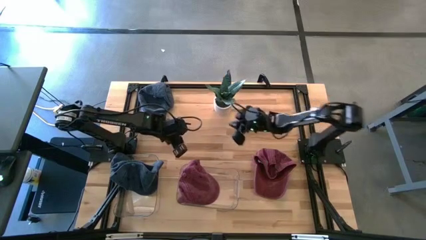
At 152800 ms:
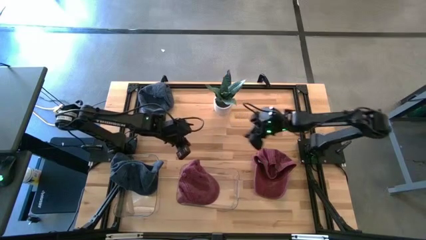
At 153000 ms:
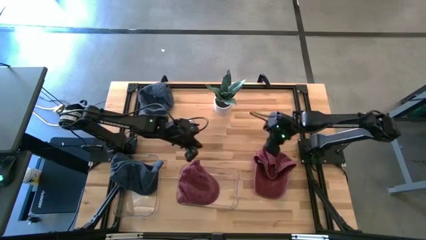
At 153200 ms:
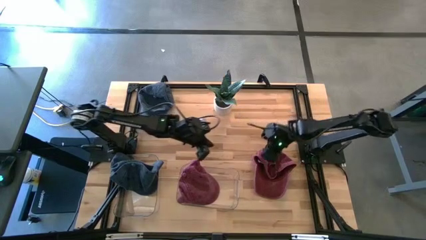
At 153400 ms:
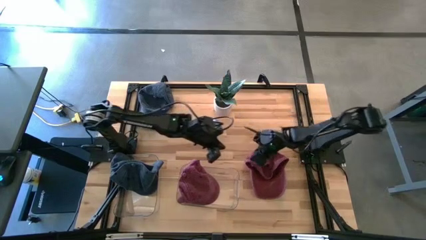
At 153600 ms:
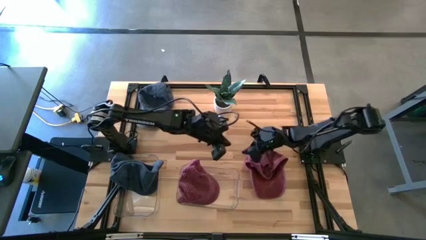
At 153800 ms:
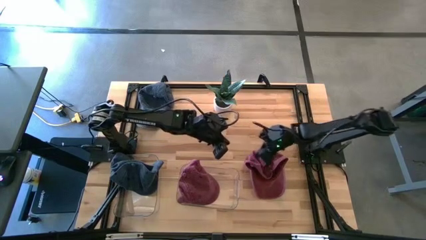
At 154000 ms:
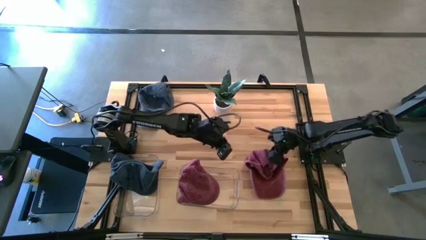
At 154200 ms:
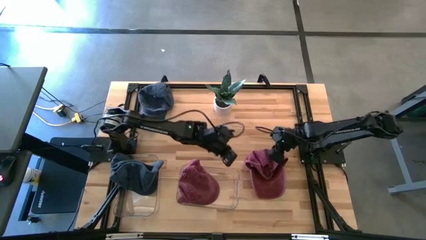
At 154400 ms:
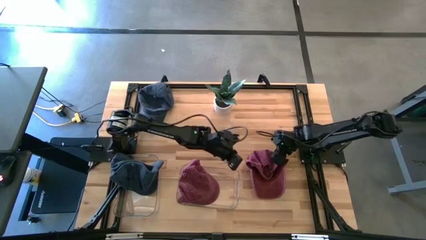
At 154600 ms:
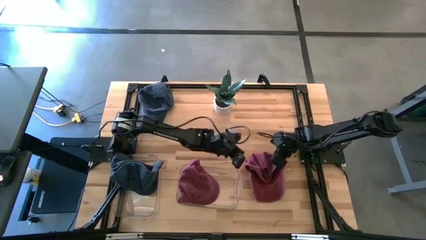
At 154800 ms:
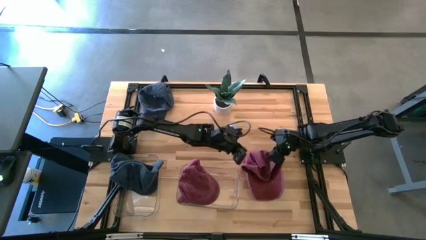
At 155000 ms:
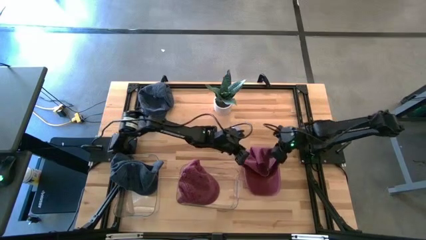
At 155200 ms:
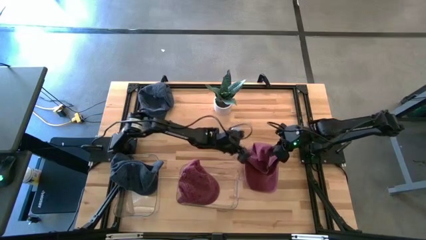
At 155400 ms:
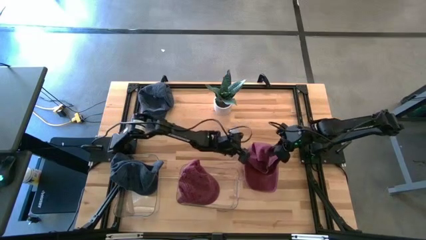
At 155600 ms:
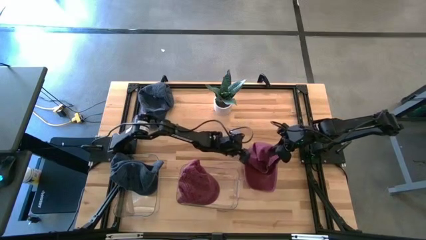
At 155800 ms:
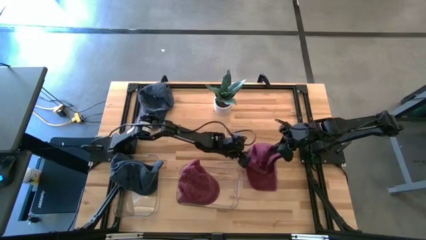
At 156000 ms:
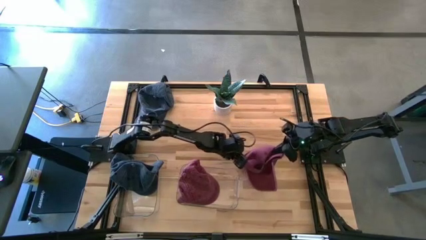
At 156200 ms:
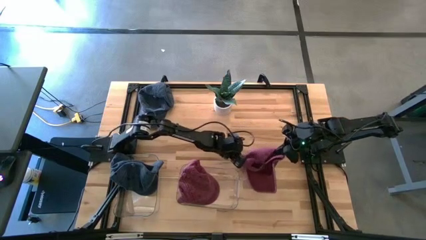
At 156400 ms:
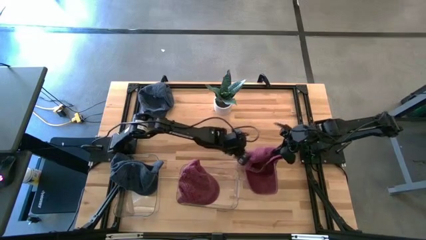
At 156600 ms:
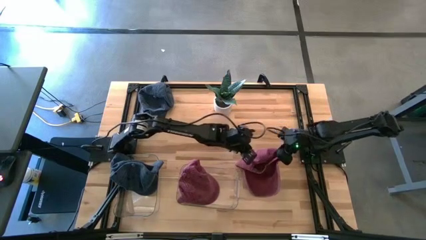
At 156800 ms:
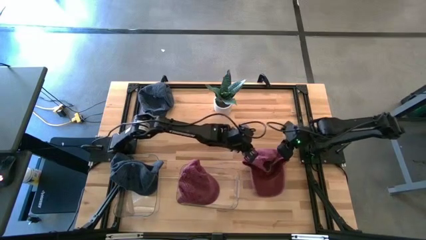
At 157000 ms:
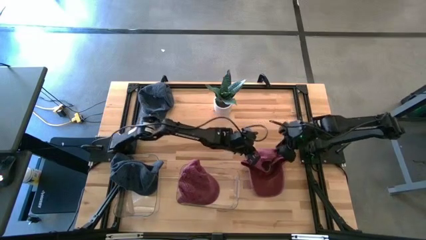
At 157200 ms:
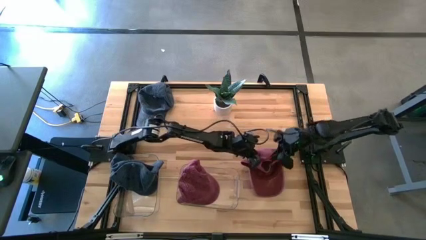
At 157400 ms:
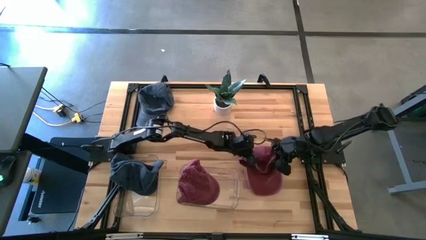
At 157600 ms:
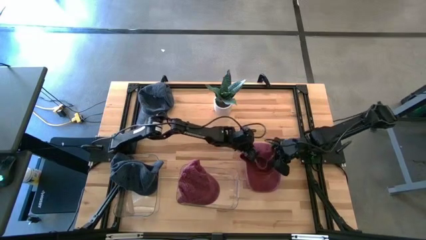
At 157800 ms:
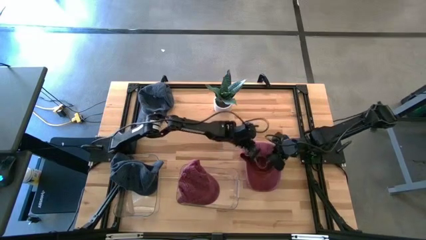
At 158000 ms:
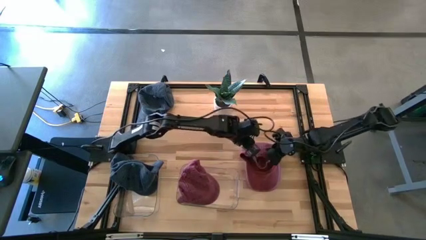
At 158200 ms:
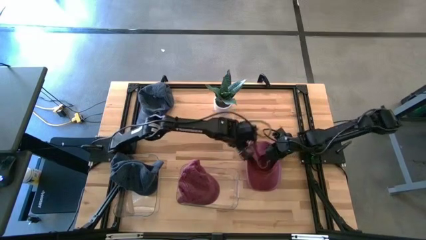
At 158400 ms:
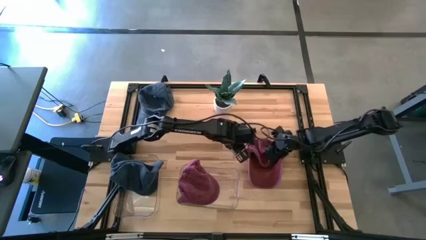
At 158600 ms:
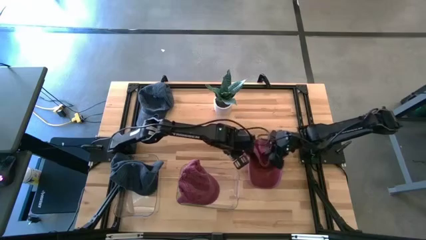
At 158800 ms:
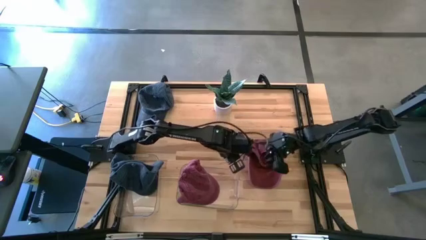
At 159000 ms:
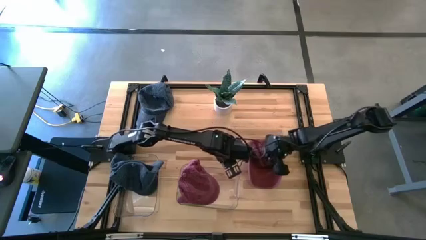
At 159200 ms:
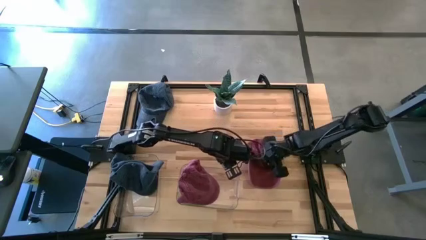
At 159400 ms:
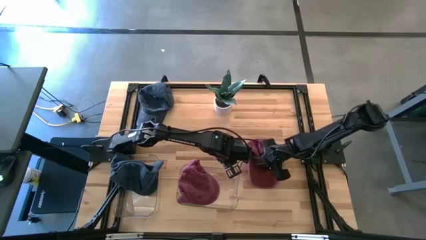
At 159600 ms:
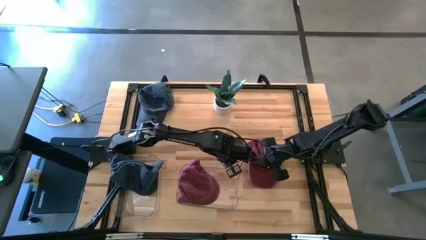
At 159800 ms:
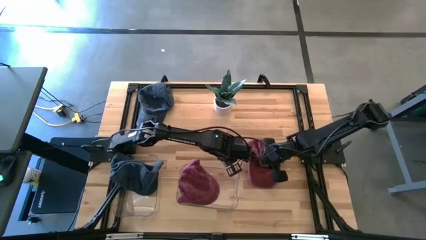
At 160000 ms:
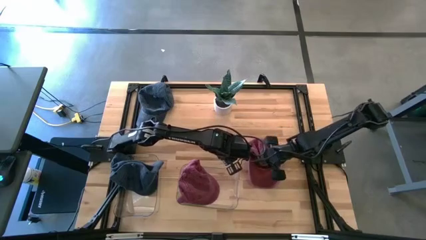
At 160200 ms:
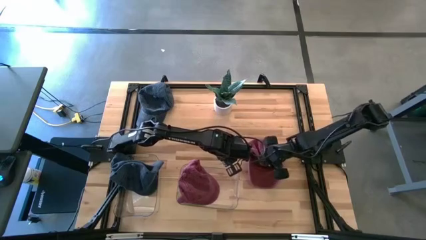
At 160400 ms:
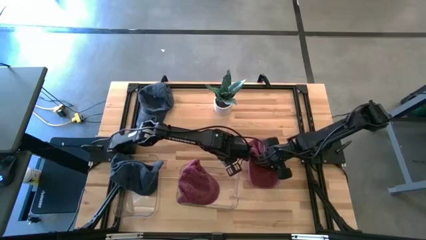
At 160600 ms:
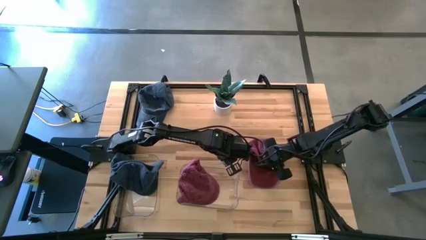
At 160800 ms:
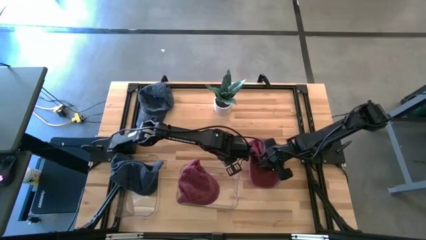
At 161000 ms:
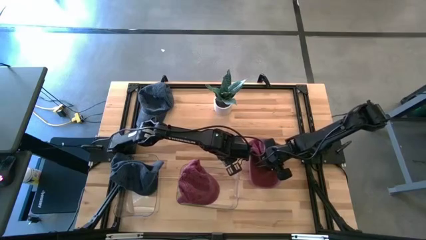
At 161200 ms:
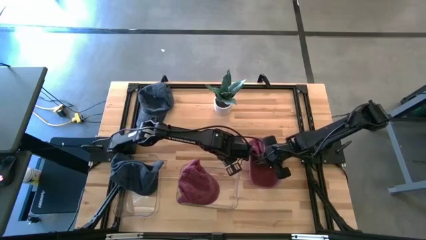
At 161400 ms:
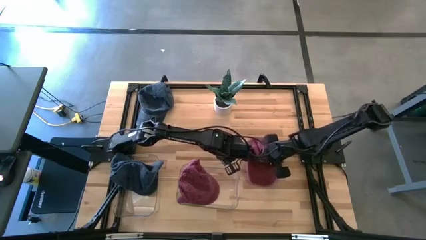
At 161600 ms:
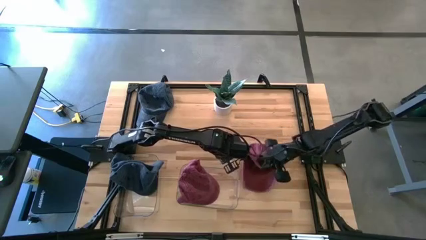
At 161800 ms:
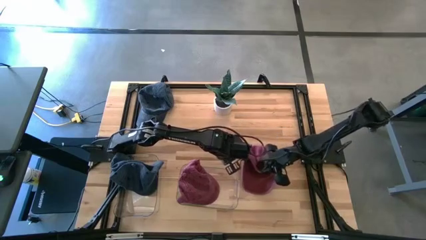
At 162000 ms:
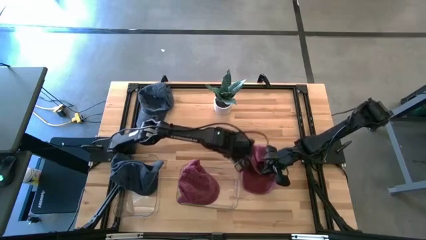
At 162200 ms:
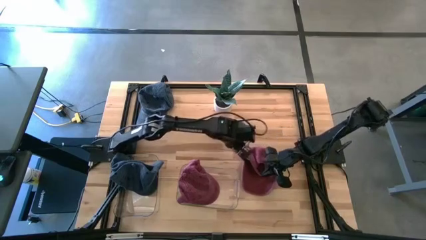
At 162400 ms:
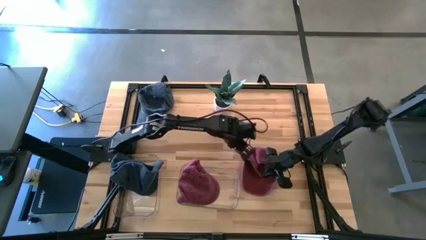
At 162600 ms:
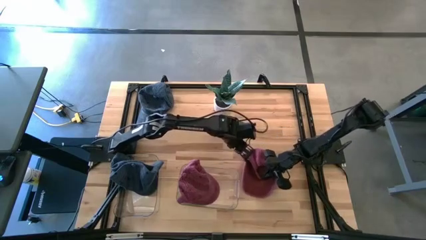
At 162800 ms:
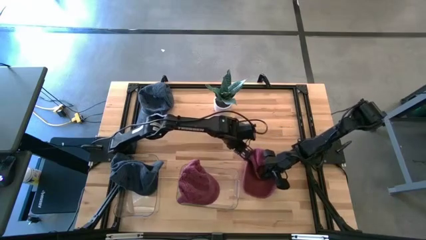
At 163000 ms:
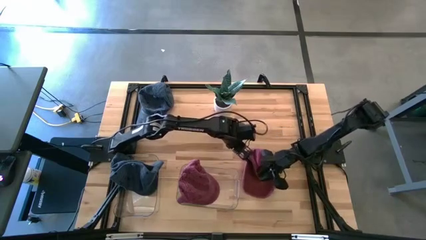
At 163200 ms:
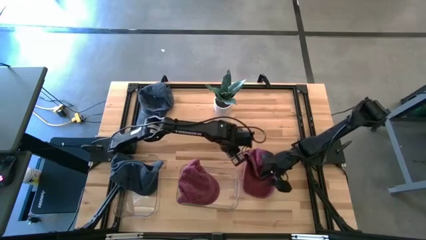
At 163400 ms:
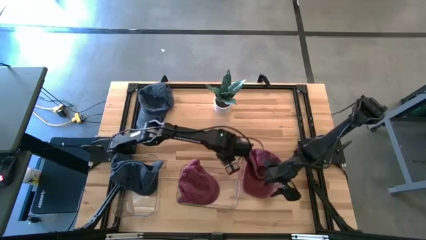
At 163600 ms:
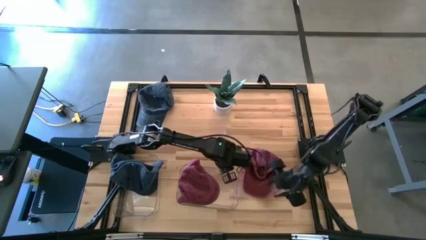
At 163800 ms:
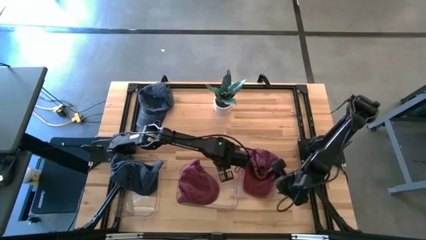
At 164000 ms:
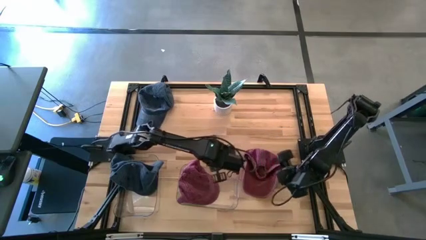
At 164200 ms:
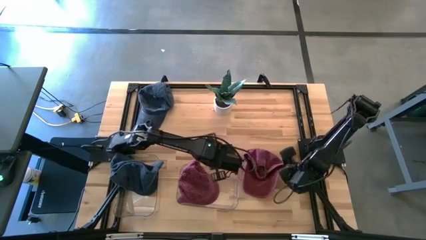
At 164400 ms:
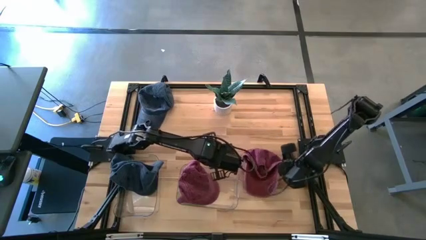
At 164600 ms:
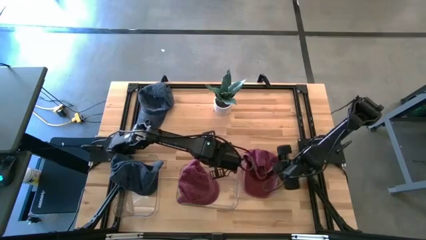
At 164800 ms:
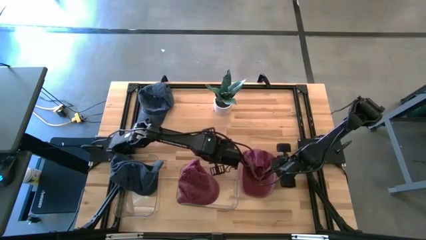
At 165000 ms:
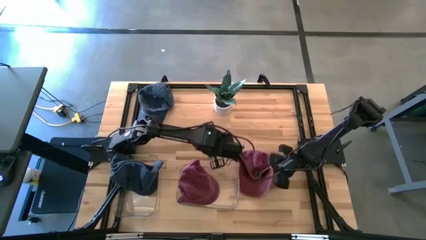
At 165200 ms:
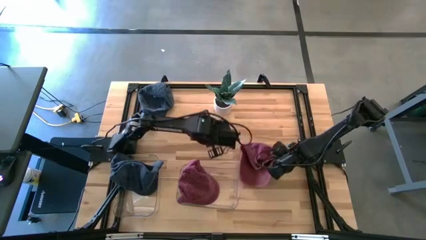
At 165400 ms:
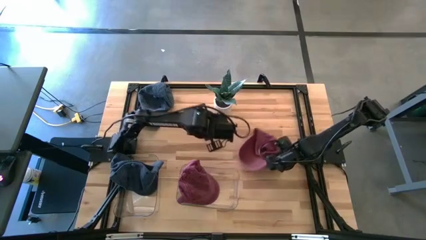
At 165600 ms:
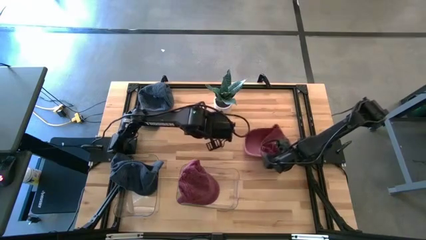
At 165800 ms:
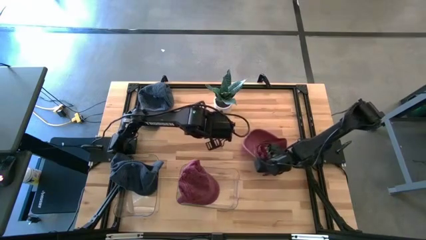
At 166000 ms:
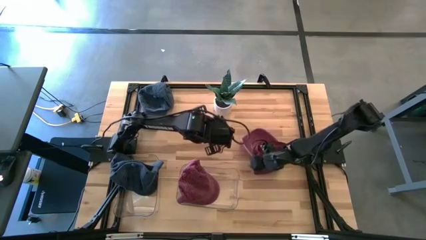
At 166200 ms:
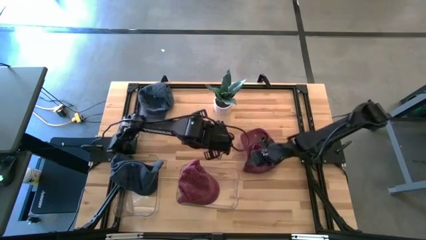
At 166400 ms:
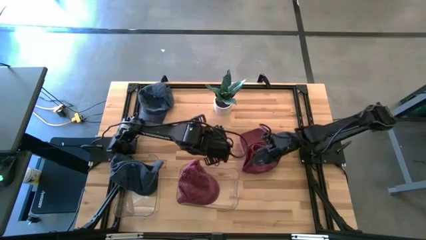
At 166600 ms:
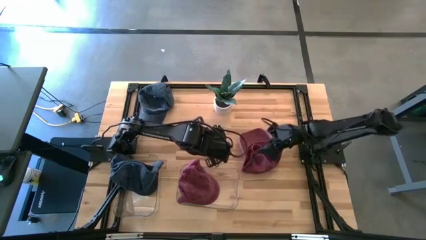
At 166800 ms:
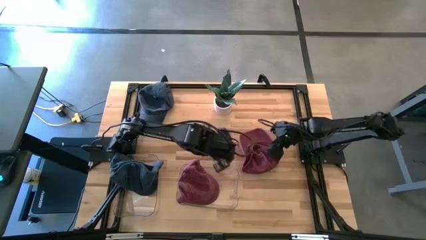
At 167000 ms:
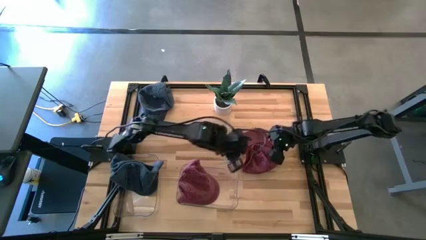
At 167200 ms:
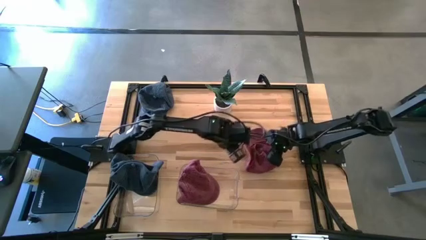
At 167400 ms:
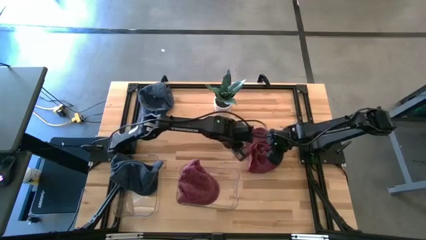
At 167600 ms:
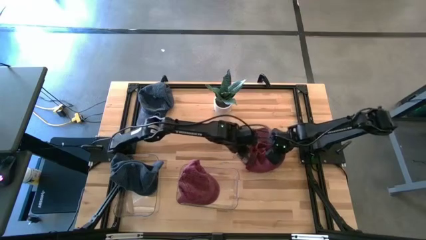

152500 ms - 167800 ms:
Task: Pick & Place hat
Put the red cap into the right transparent bin
